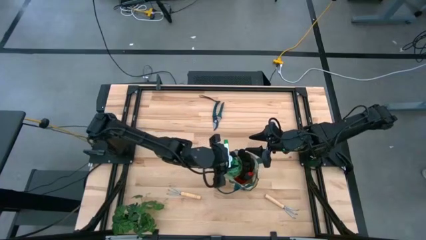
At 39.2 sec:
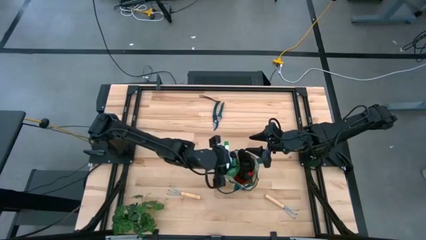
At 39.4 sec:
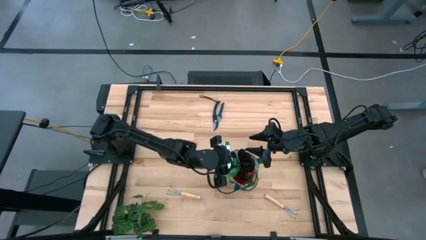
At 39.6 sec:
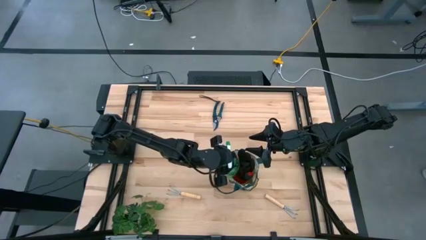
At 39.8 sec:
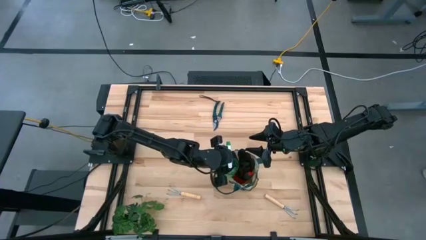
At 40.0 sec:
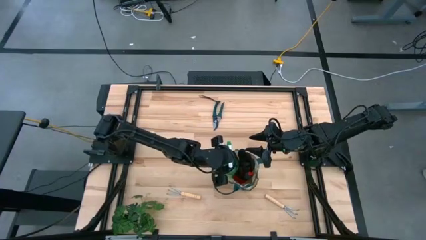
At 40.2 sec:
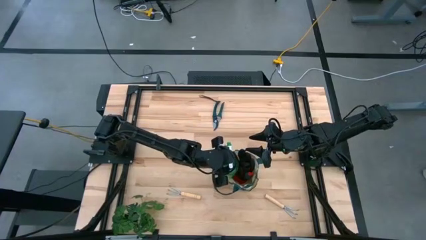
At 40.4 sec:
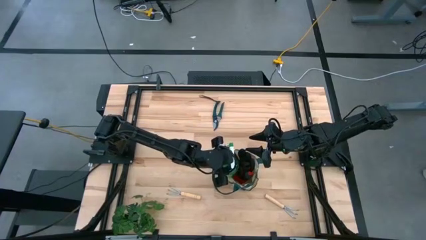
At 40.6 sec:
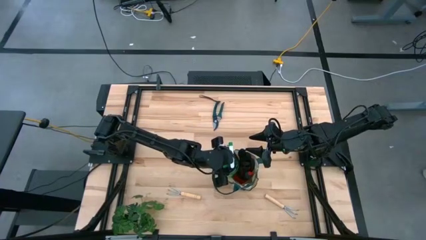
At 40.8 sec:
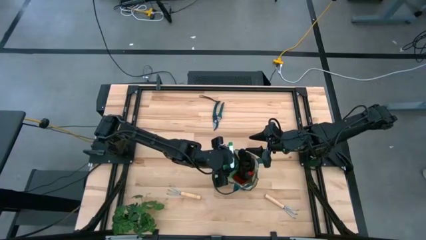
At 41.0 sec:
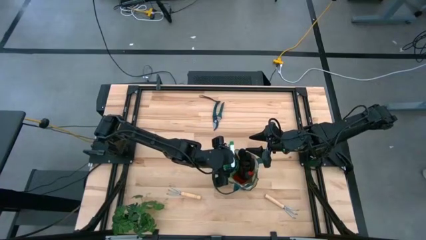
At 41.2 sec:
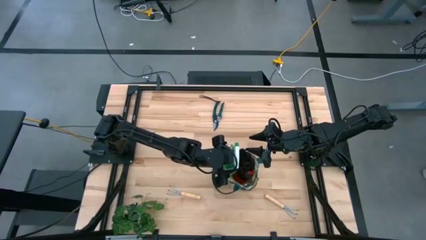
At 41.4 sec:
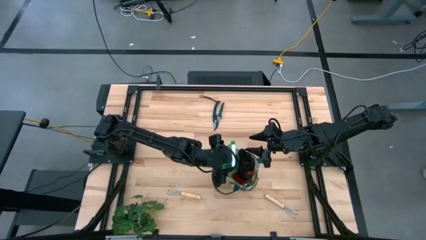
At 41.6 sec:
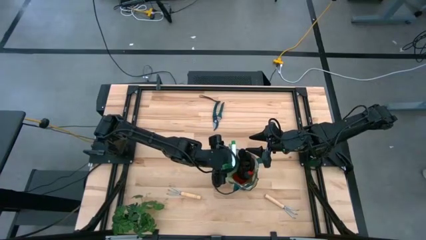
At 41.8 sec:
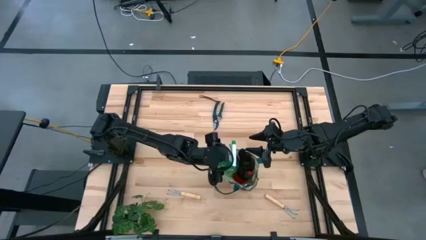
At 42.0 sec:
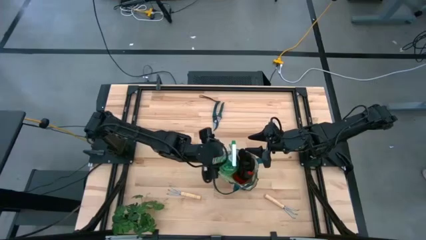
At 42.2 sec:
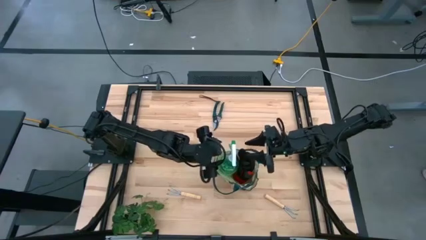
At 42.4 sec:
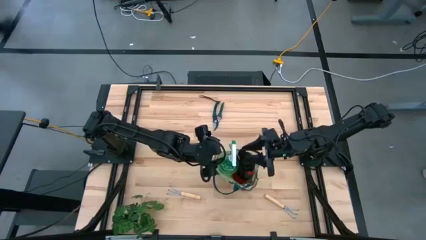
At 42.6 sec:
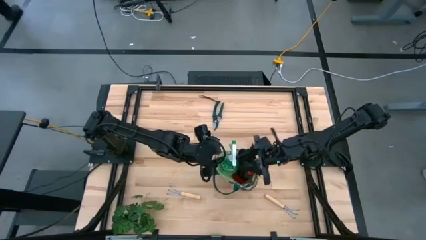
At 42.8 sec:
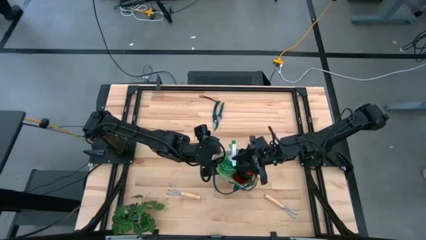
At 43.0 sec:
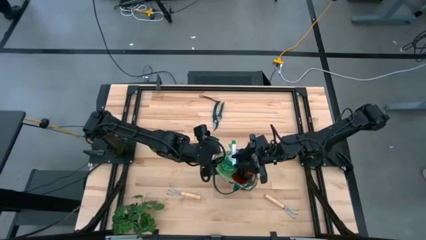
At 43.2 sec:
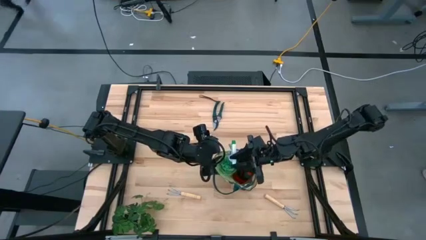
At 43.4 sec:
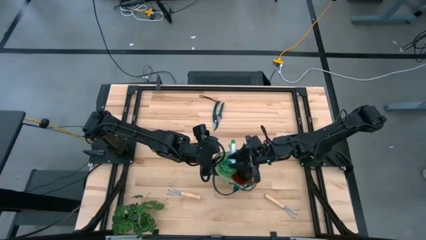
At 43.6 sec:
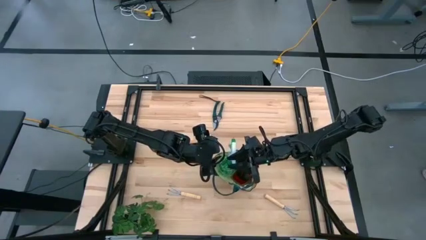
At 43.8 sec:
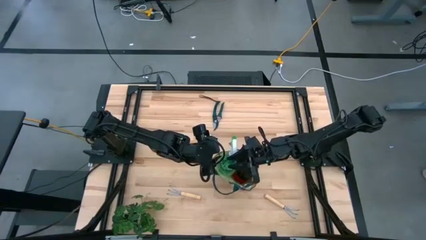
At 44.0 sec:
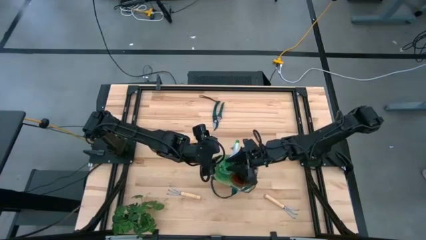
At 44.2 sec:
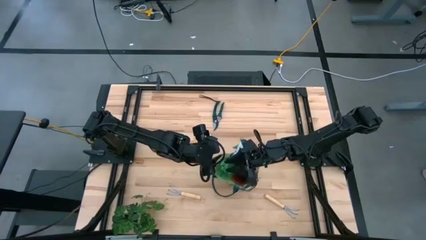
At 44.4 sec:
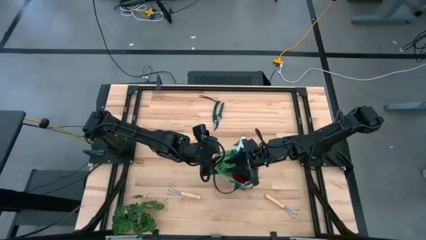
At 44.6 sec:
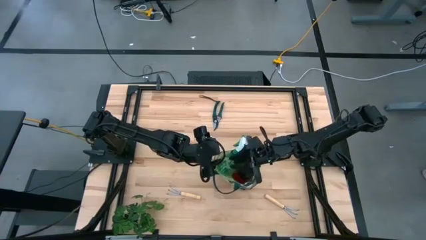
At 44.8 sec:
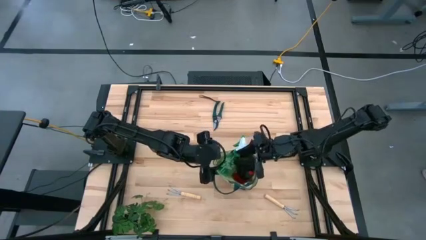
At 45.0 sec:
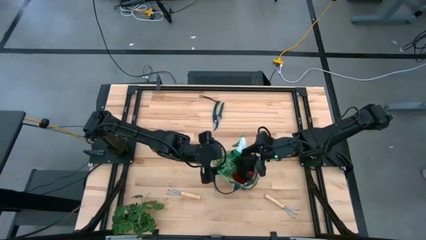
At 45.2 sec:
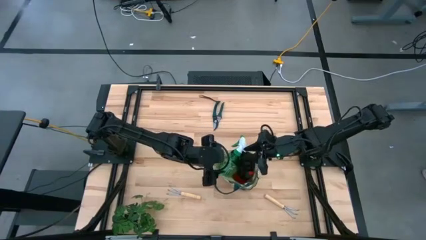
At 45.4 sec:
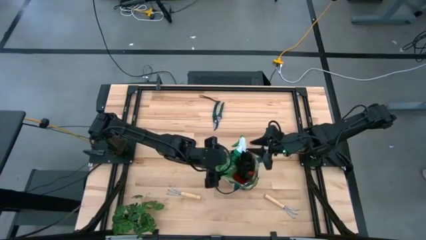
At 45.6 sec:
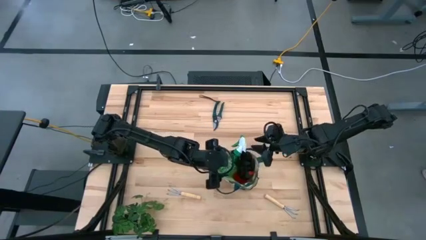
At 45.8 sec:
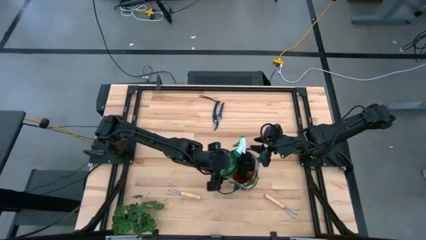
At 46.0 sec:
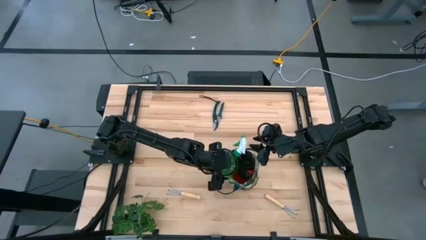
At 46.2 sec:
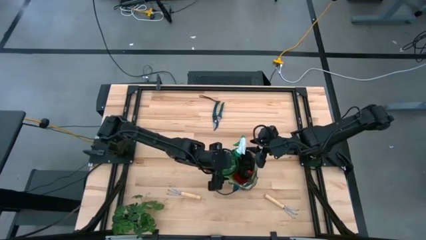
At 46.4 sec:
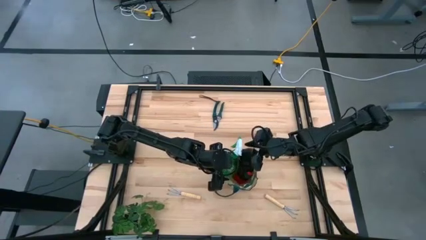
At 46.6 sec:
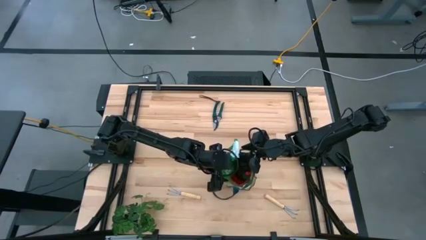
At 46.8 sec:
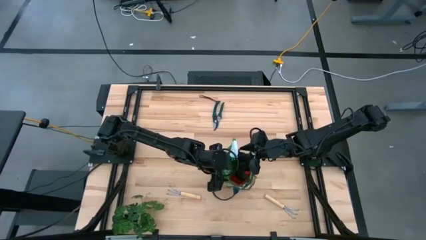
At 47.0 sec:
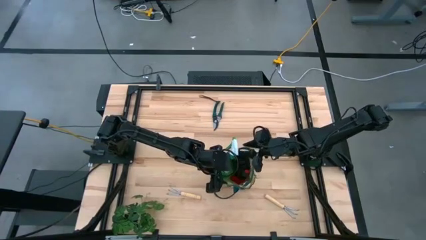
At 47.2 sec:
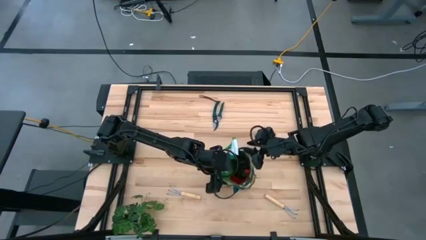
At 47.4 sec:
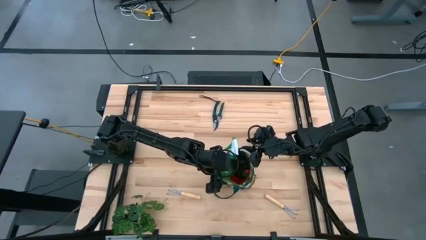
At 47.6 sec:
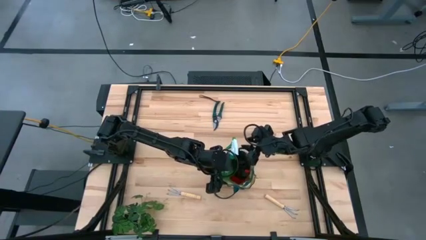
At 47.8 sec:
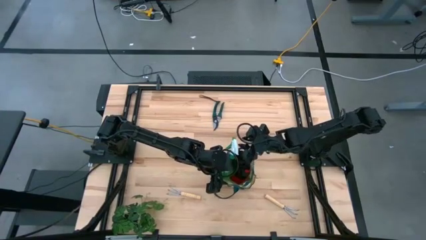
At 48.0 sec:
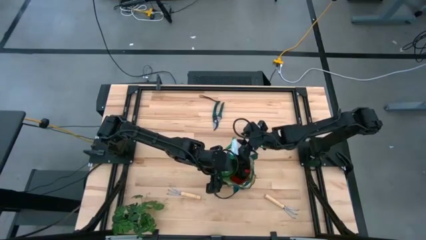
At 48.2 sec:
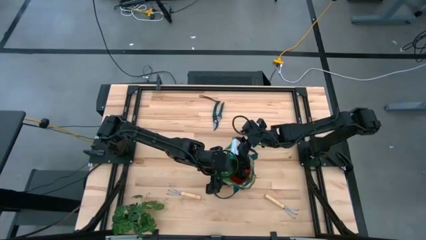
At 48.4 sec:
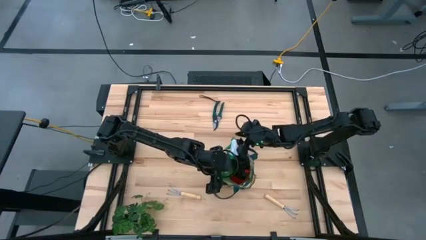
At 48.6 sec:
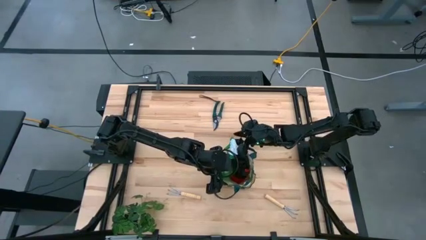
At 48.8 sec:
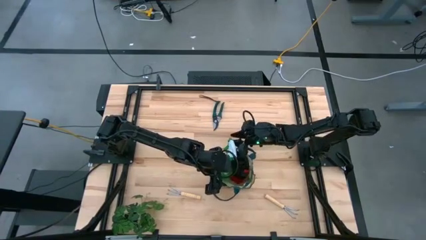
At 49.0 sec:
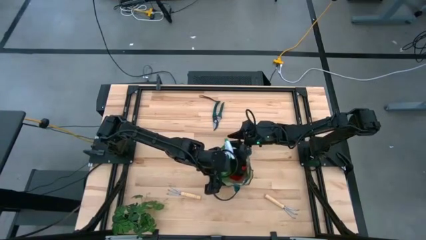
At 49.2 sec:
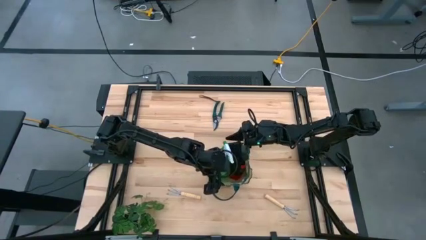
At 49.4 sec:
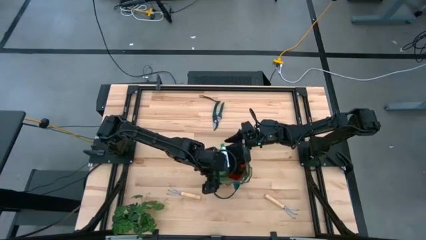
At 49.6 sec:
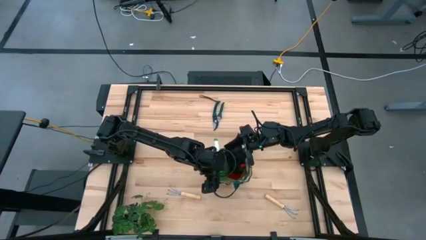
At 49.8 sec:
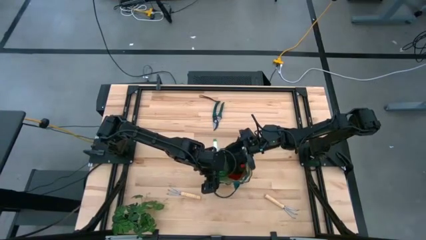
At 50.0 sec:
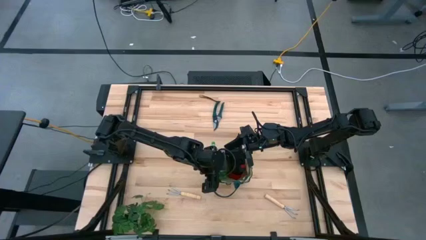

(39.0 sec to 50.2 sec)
Task: Pick & Place Garden tools in Gardening bag
Put the green spray bottle into the green gardening bag

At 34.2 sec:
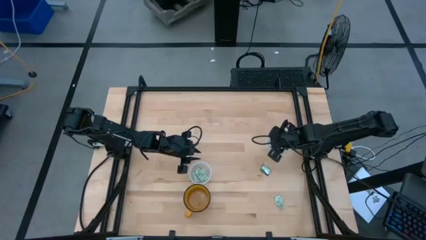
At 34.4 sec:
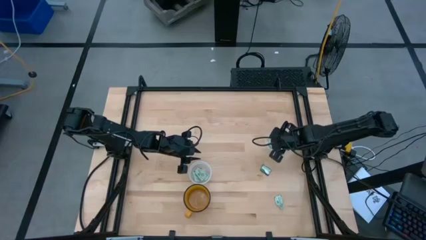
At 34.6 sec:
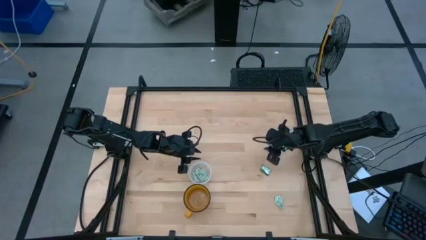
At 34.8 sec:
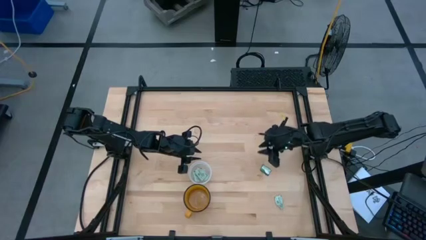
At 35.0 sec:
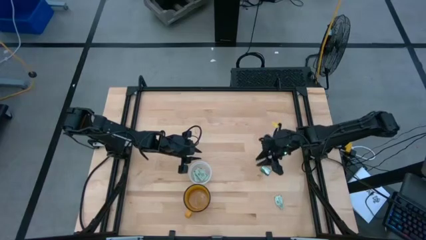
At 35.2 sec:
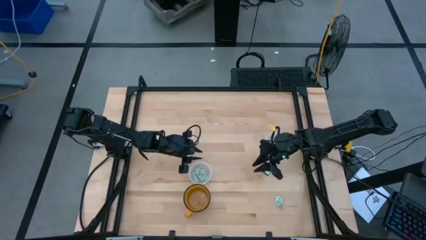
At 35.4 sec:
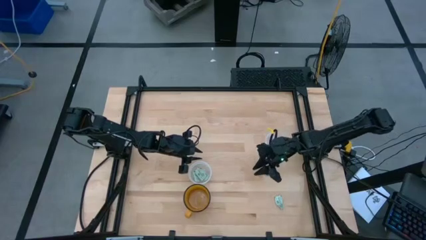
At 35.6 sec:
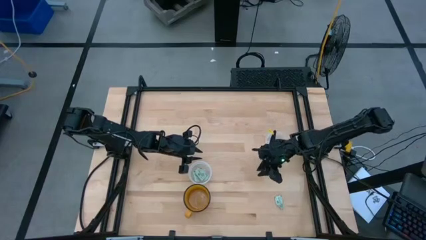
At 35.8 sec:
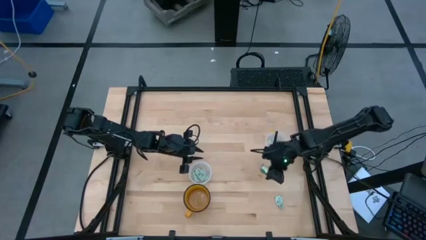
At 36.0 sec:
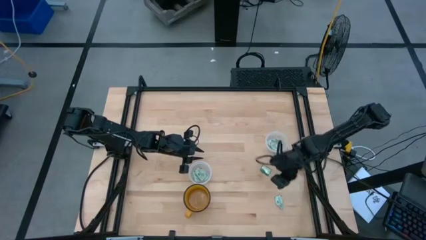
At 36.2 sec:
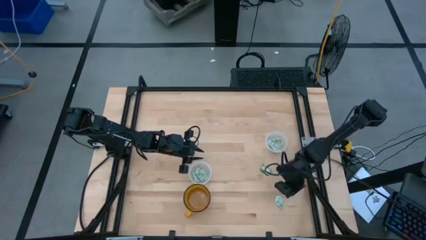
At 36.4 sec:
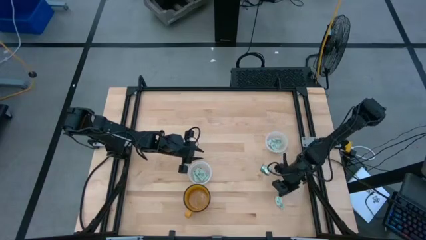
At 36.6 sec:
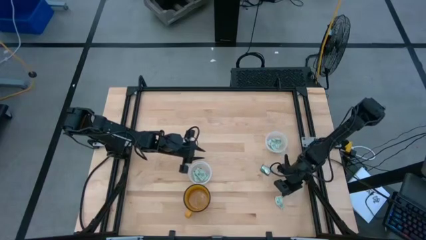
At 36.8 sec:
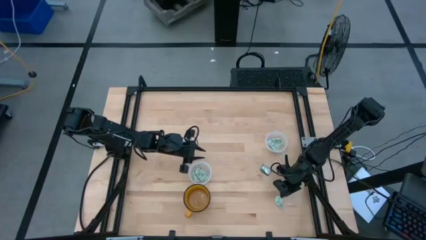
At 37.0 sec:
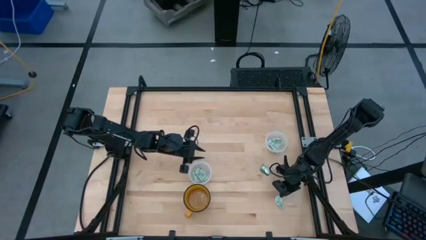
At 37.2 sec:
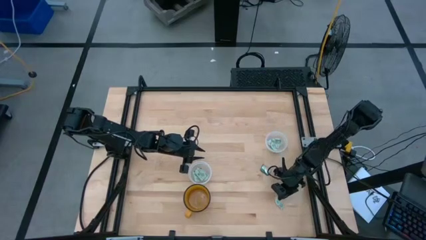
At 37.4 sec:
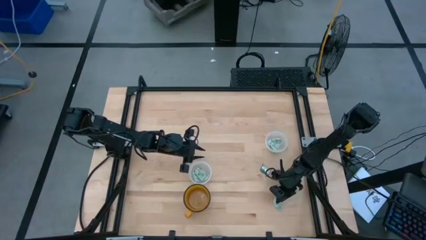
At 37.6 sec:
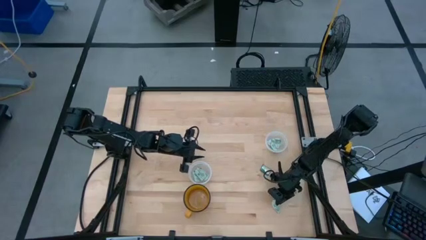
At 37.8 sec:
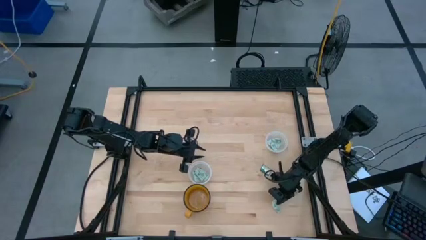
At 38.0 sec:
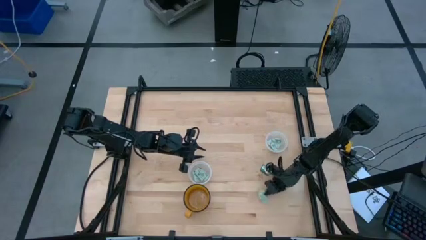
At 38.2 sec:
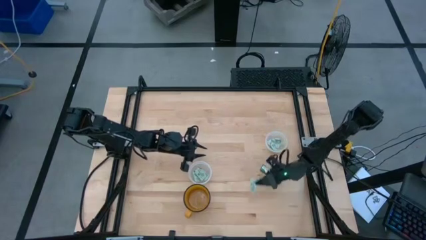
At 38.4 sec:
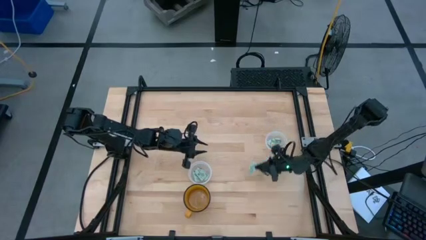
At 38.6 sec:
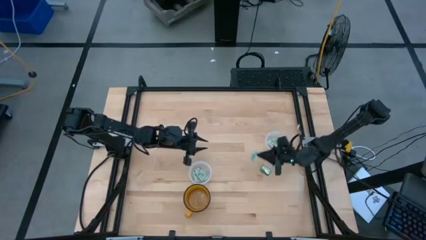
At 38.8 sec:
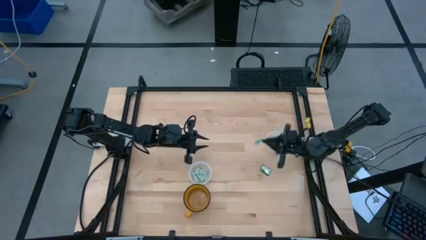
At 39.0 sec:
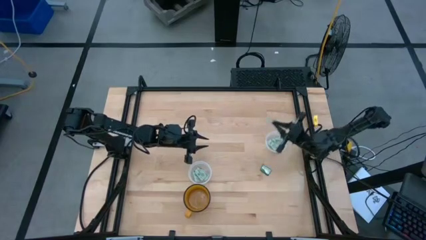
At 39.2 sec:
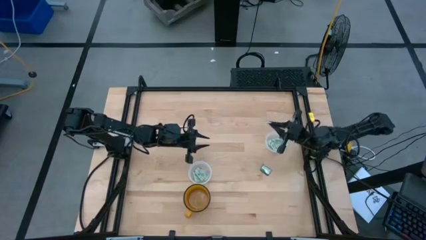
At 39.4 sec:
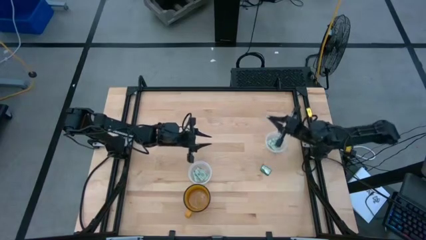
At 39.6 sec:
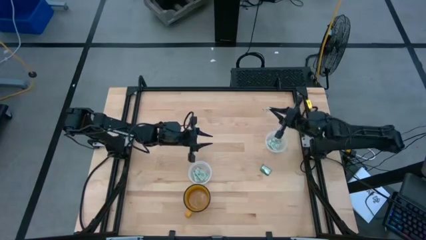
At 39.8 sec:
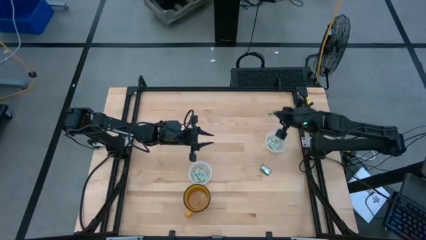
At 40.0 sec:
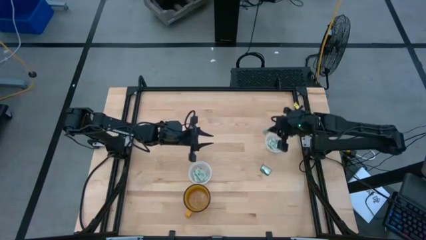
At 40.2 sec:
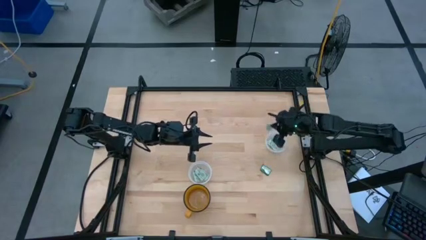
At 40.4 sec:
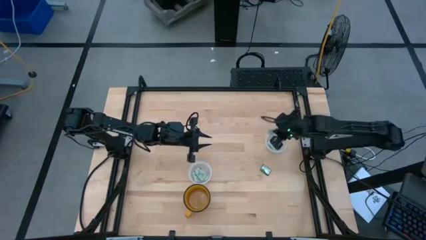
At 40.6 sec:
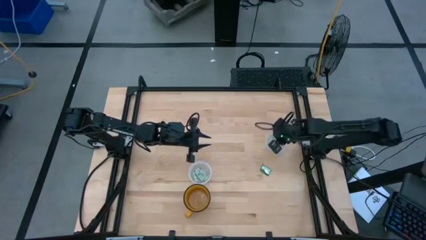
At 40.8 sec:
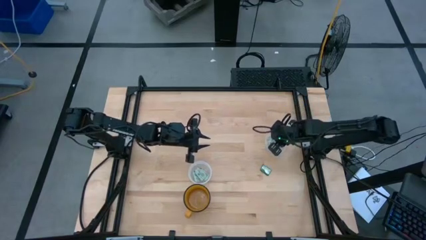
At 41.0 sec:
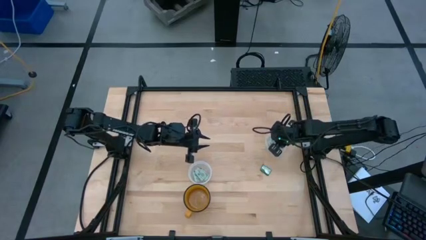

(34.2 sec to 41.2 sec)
Task: Pick and place items into bin
Put the stevia packet into the right transparent bin
